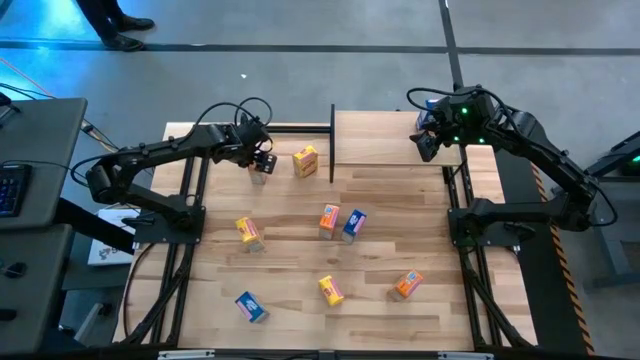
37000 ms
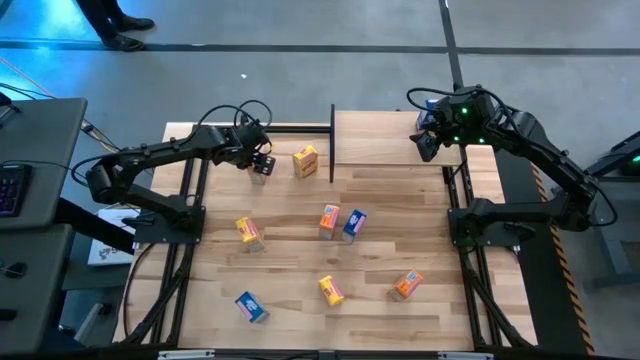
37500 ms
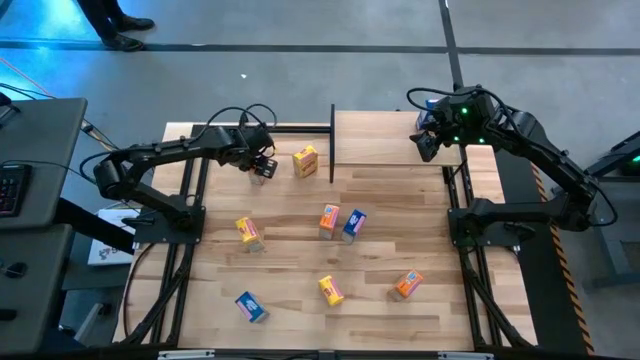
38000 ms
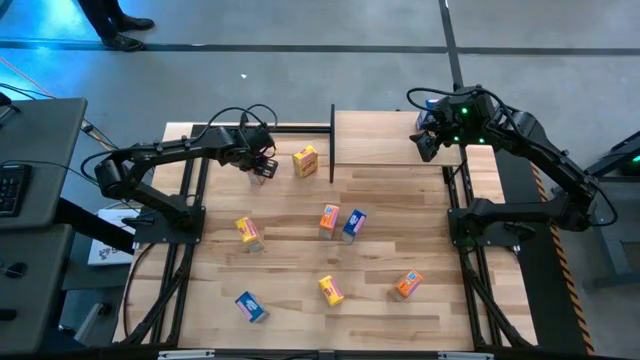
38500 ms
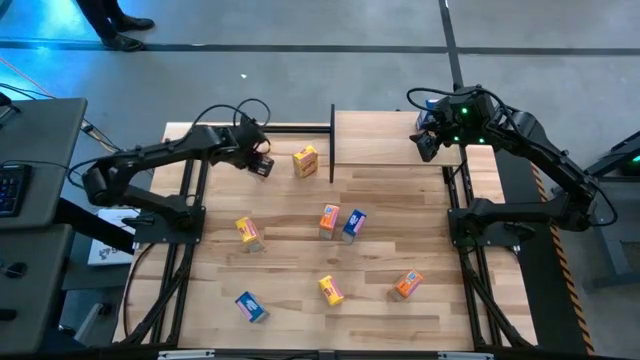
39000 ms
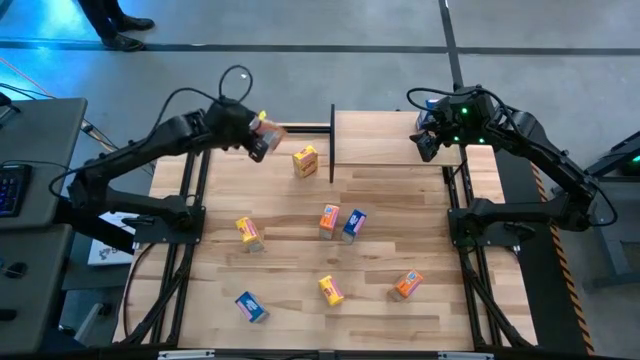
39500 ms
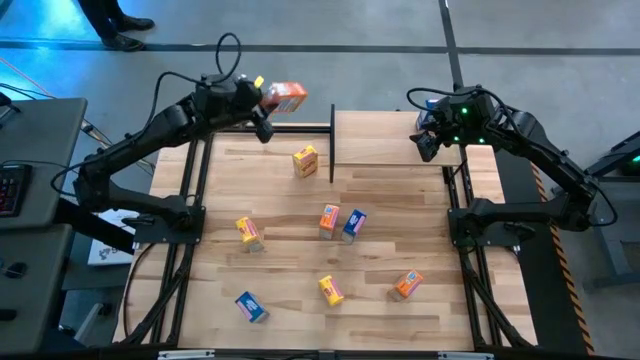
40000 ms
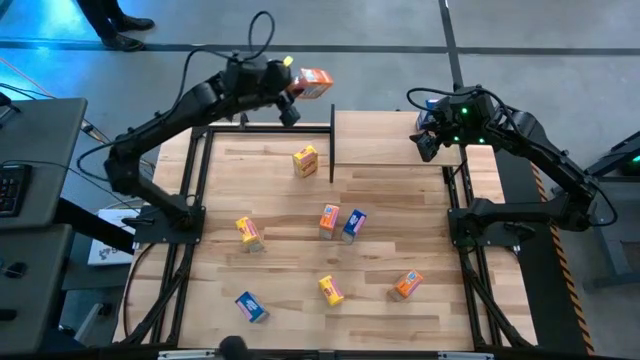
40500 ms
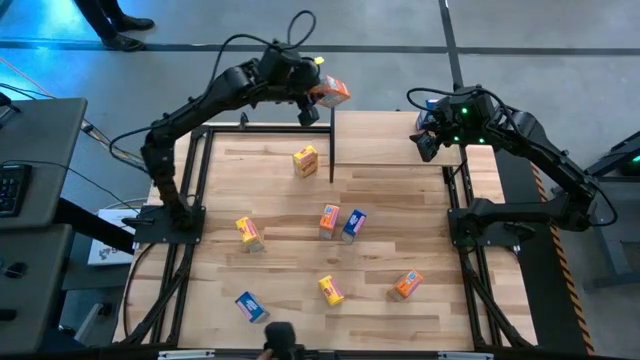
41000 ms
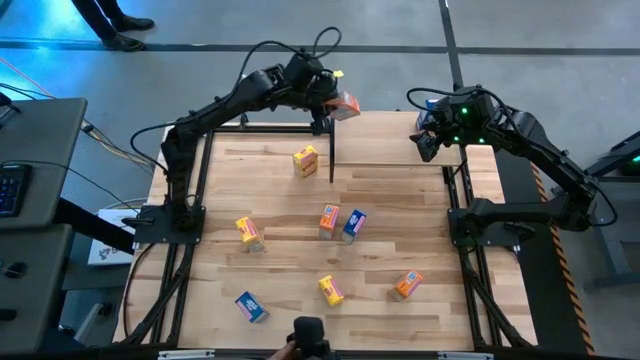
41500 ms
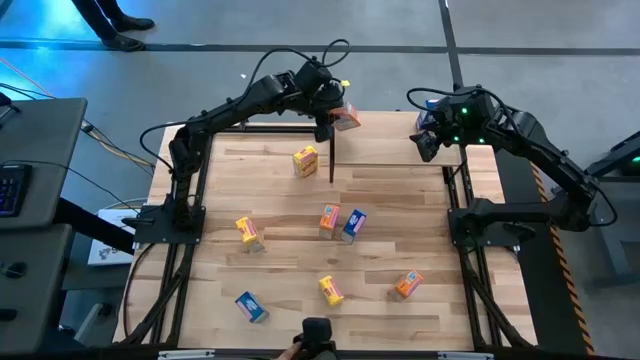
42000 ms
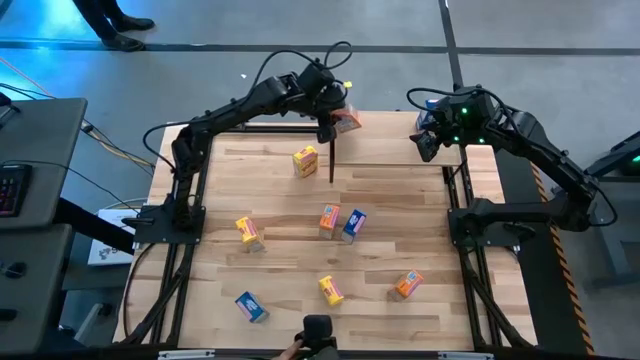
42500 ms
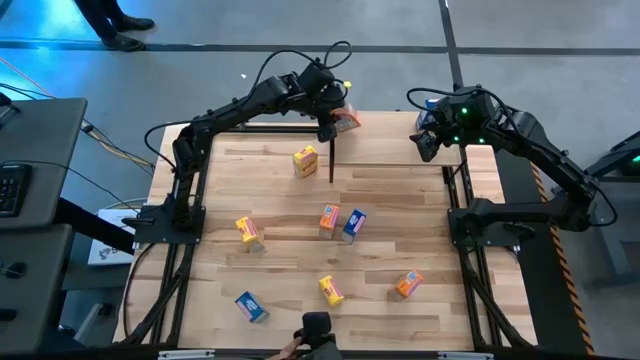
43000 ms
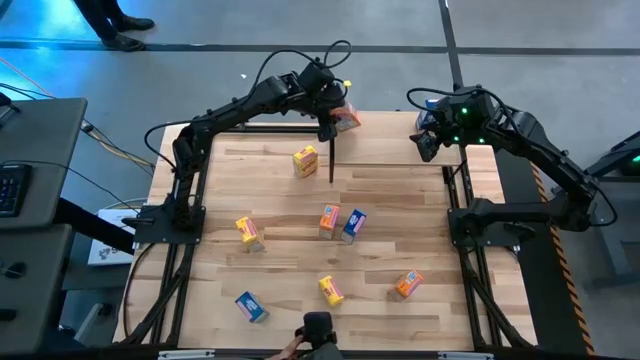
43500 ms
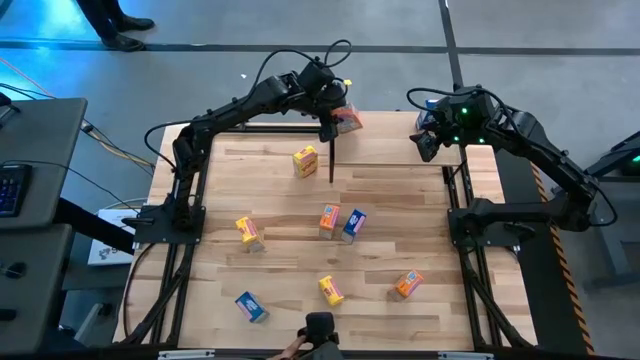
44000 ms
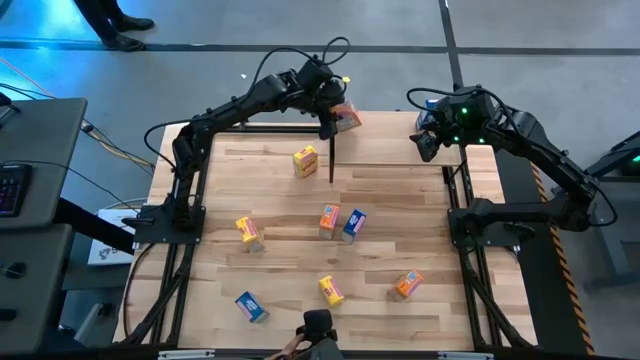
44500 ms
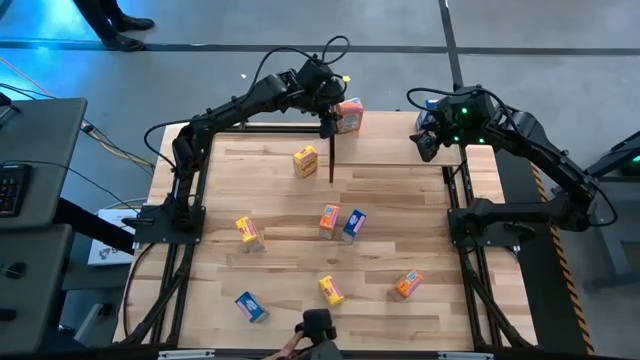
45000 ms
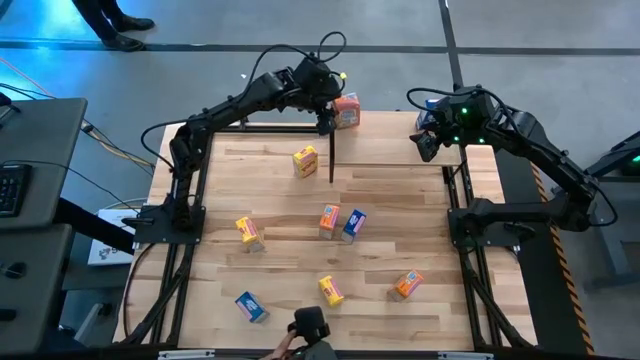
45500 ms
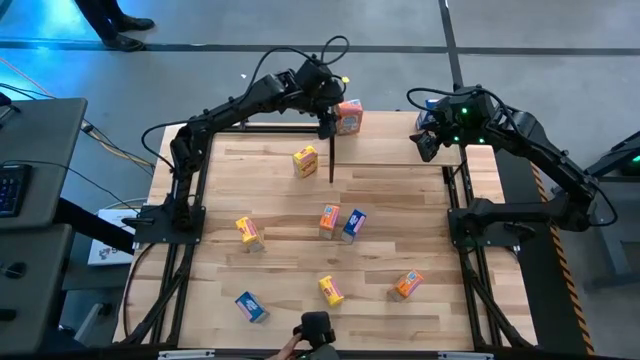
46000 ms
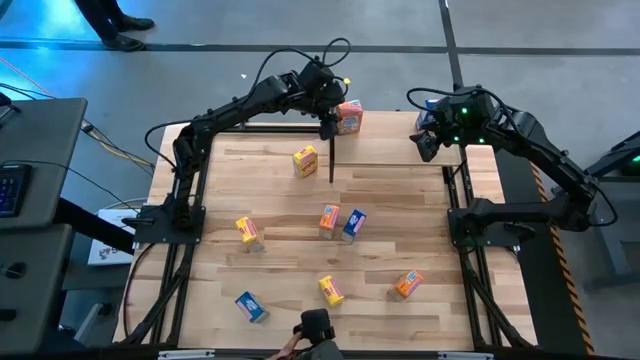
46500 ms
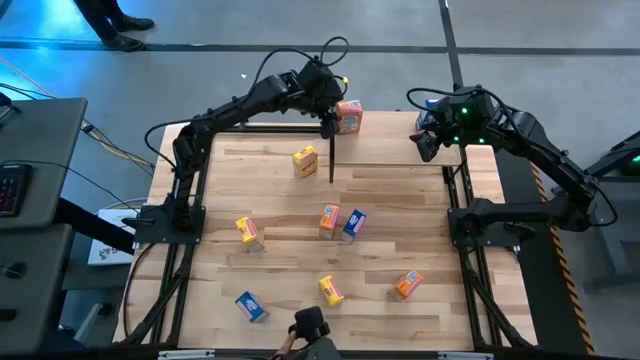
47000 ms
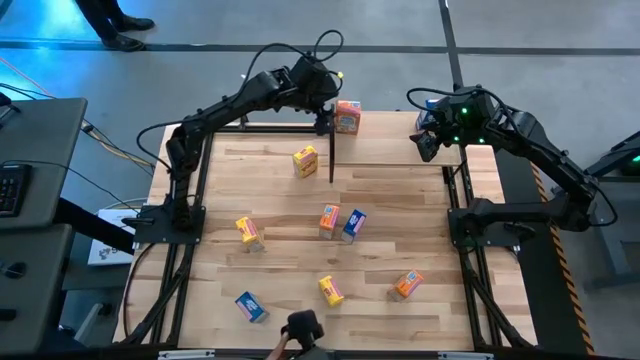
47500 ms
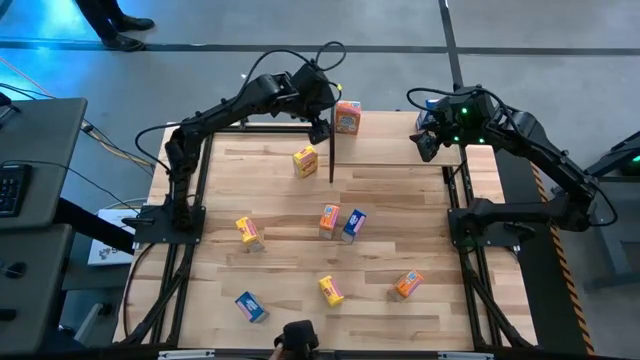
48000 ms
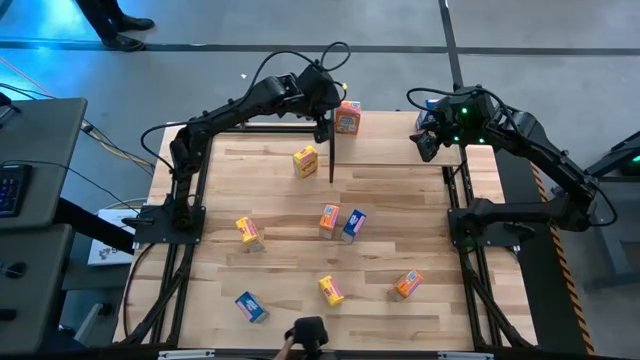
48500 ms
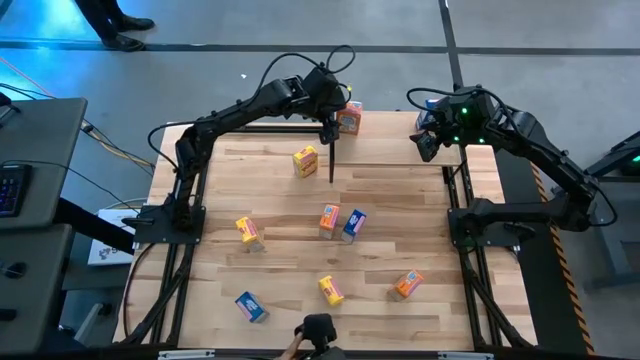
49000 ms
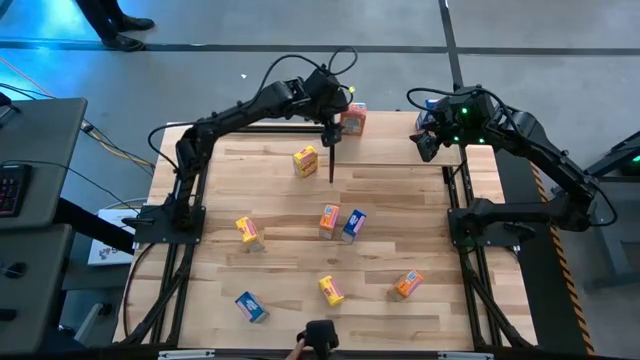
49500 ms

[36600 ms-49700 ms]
Task: Stack cereal on shelf
Put the top orange cereal box on the shelf
